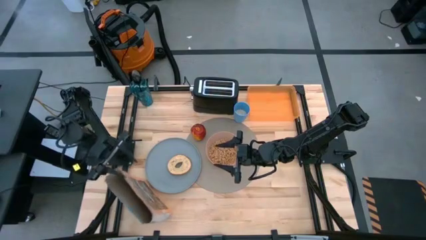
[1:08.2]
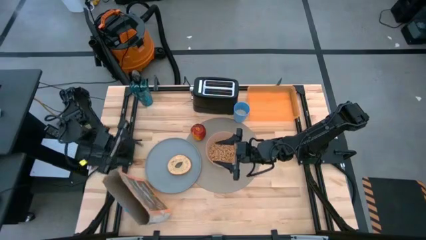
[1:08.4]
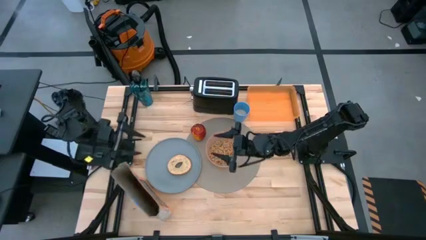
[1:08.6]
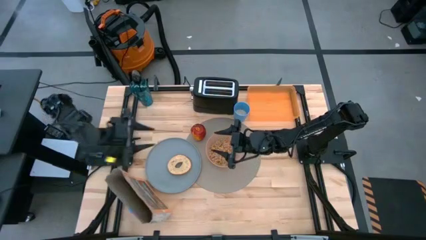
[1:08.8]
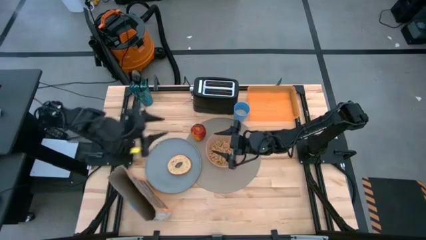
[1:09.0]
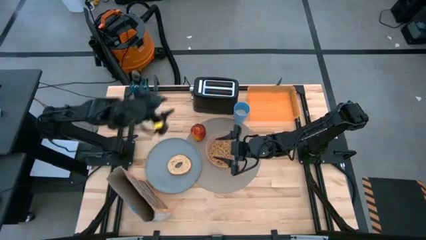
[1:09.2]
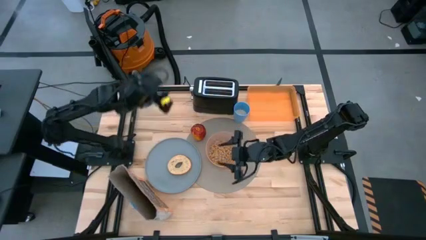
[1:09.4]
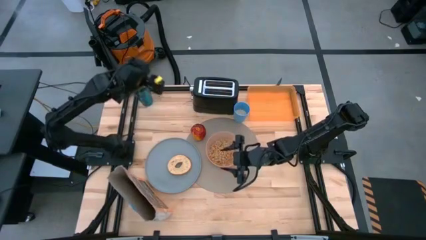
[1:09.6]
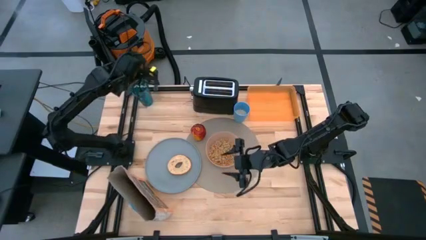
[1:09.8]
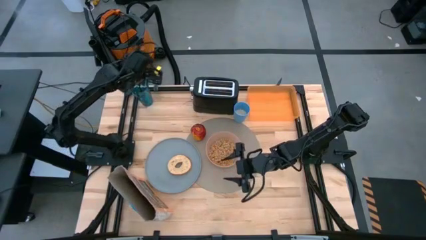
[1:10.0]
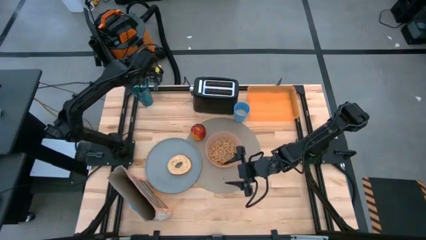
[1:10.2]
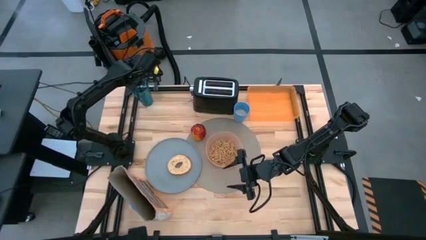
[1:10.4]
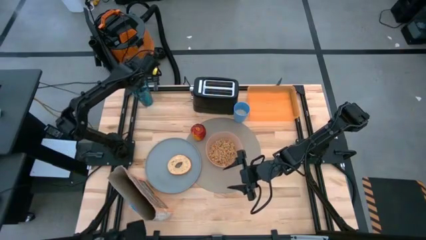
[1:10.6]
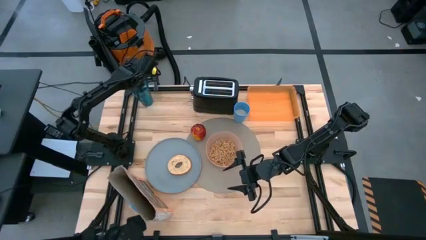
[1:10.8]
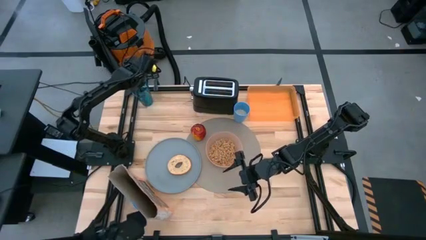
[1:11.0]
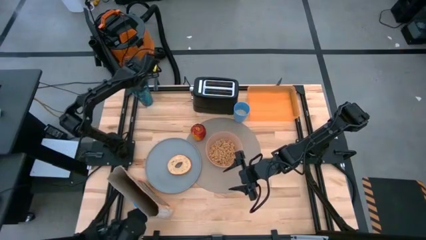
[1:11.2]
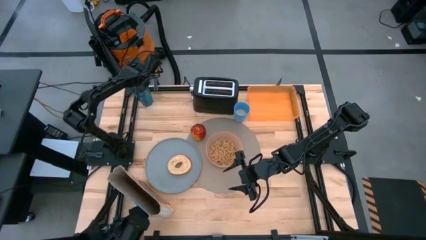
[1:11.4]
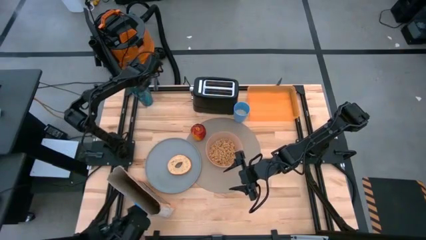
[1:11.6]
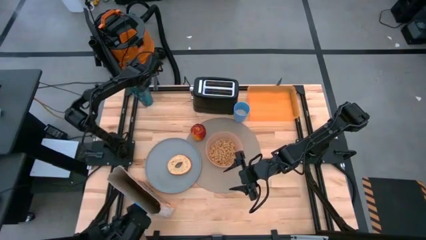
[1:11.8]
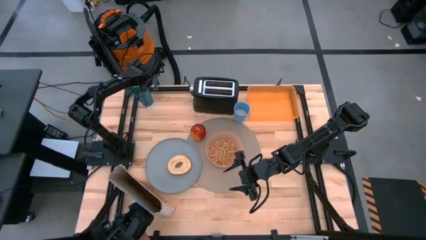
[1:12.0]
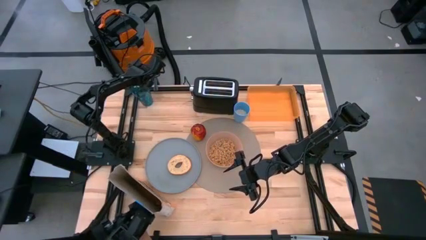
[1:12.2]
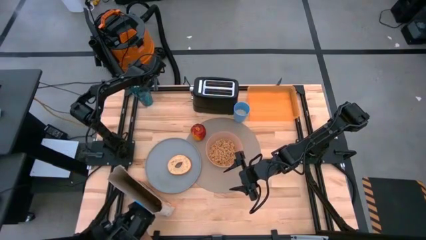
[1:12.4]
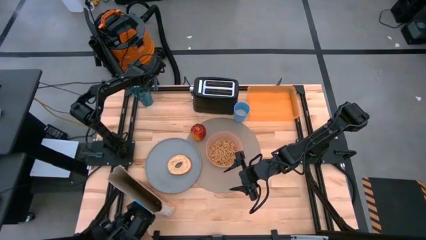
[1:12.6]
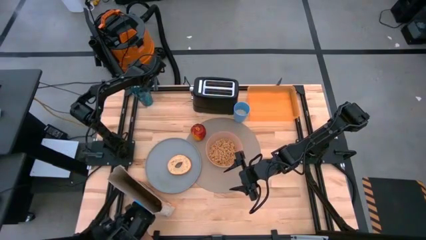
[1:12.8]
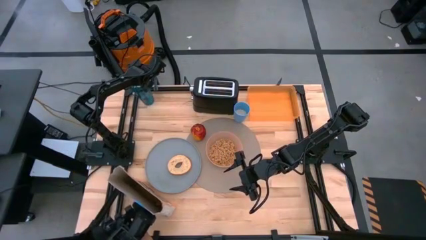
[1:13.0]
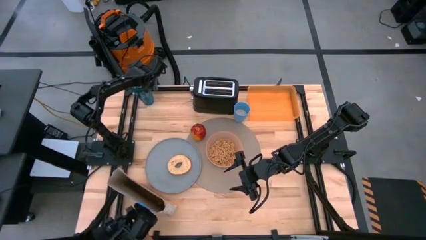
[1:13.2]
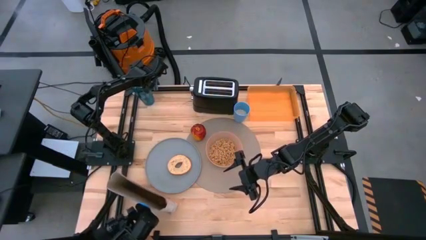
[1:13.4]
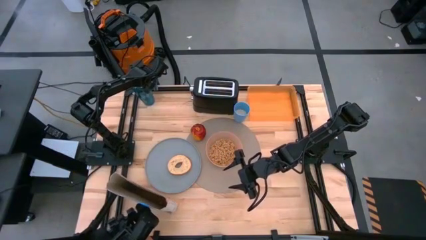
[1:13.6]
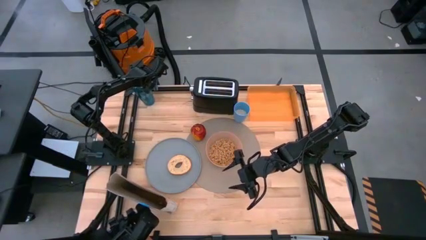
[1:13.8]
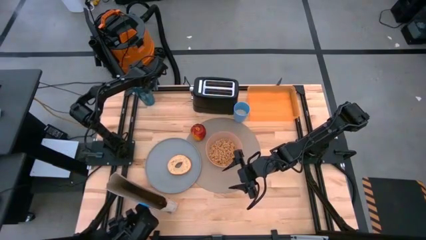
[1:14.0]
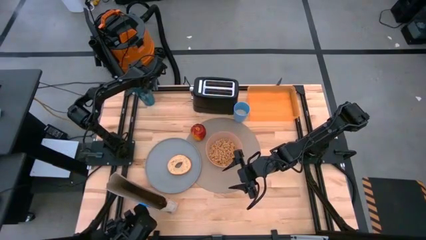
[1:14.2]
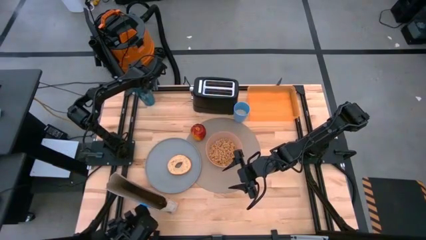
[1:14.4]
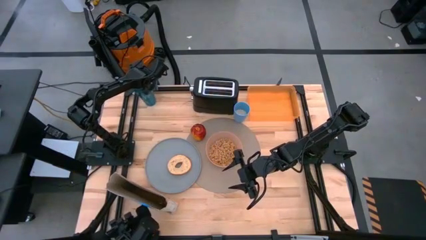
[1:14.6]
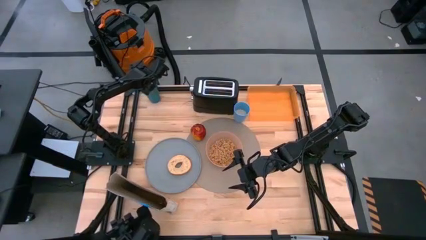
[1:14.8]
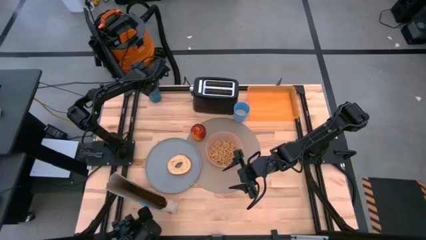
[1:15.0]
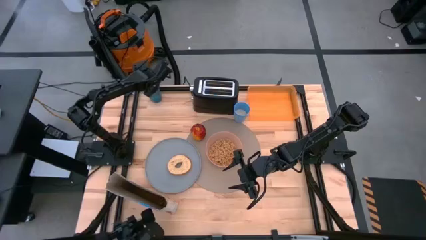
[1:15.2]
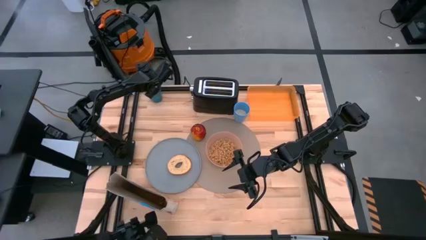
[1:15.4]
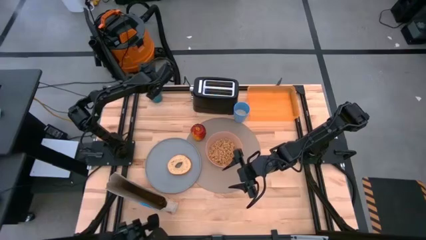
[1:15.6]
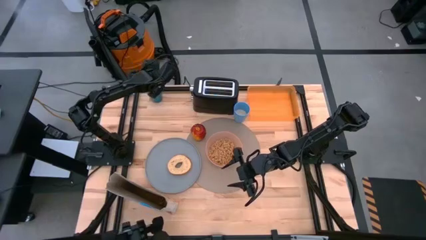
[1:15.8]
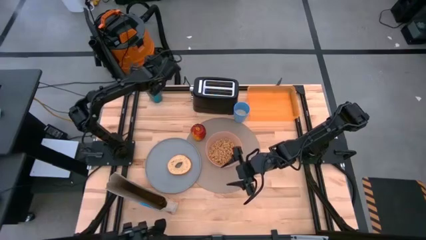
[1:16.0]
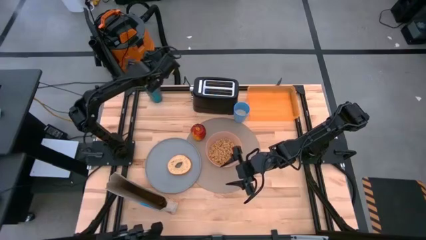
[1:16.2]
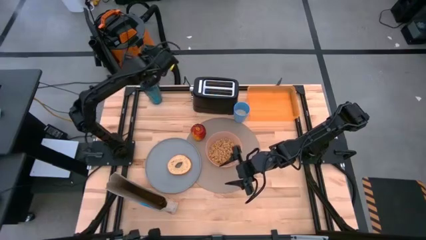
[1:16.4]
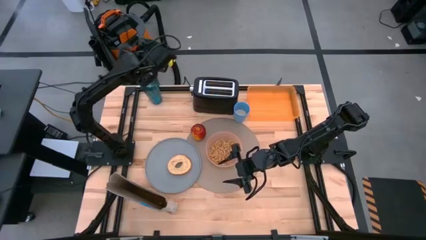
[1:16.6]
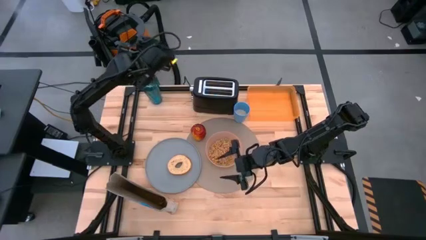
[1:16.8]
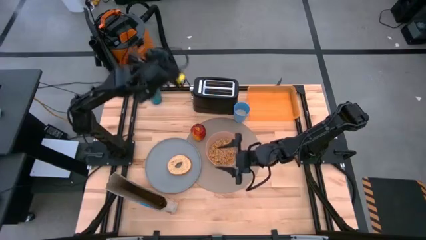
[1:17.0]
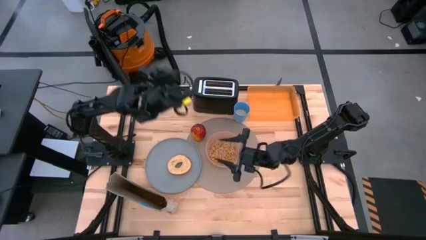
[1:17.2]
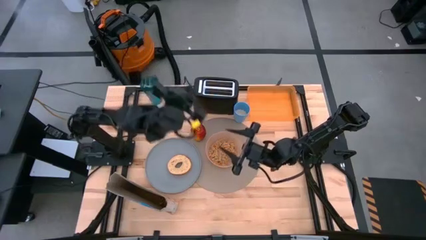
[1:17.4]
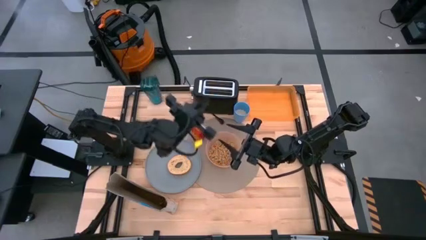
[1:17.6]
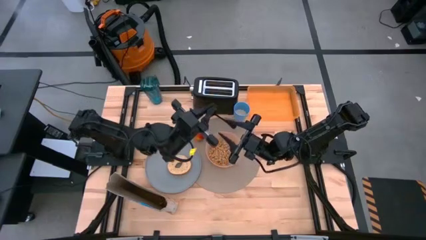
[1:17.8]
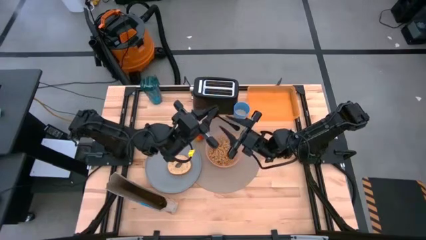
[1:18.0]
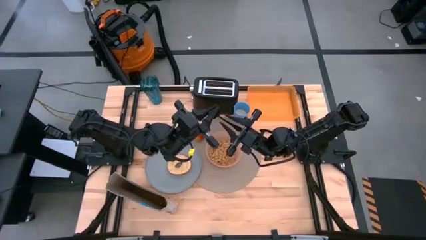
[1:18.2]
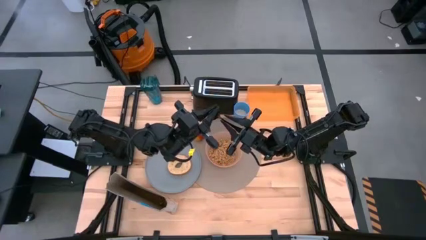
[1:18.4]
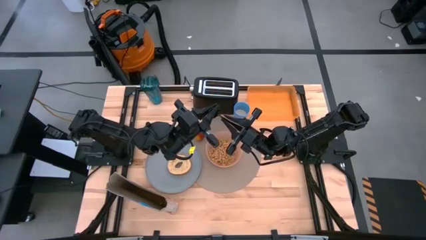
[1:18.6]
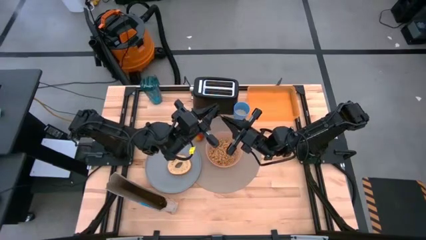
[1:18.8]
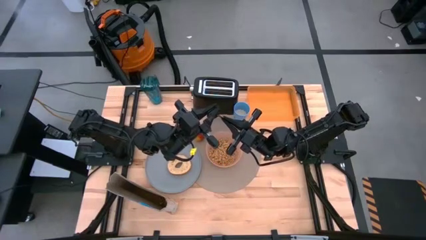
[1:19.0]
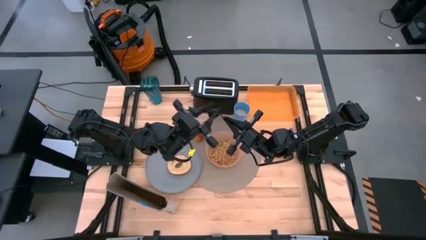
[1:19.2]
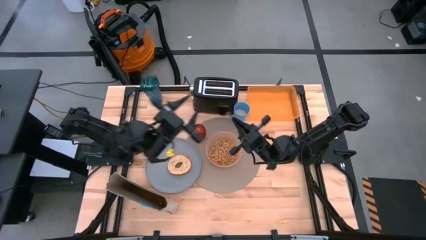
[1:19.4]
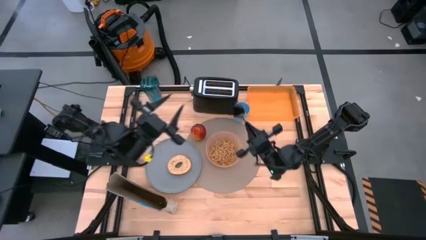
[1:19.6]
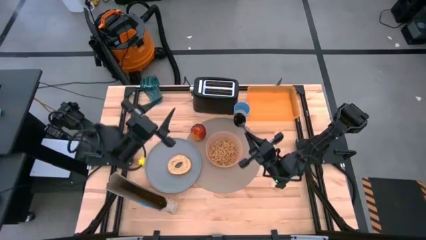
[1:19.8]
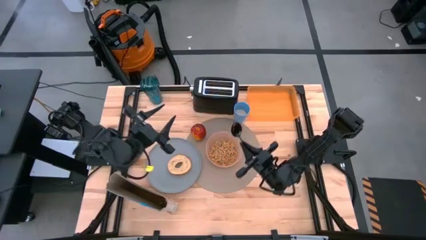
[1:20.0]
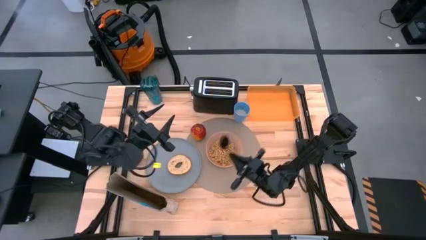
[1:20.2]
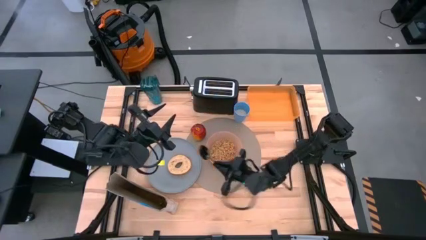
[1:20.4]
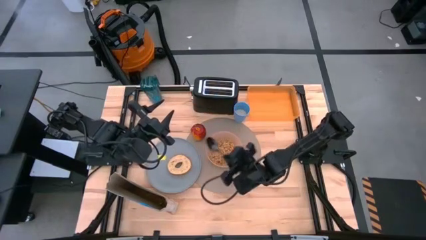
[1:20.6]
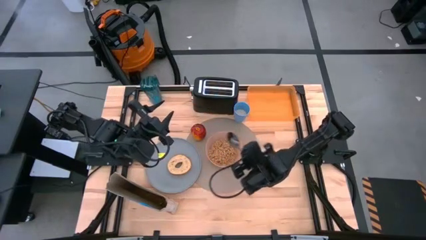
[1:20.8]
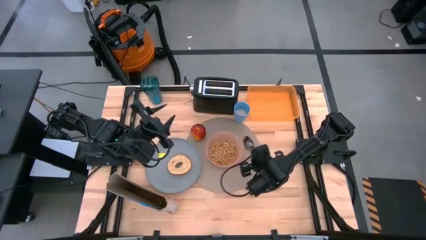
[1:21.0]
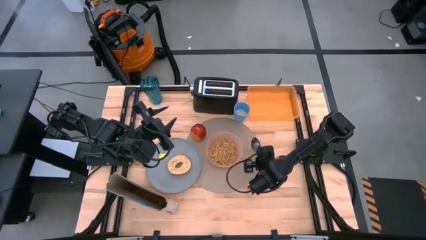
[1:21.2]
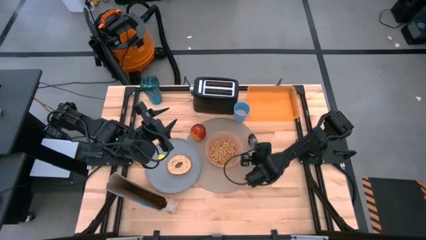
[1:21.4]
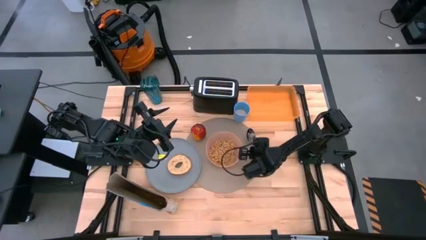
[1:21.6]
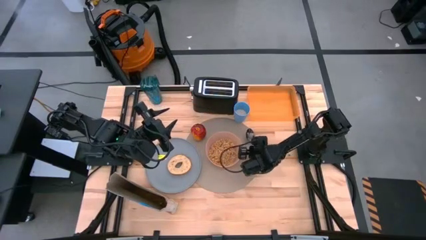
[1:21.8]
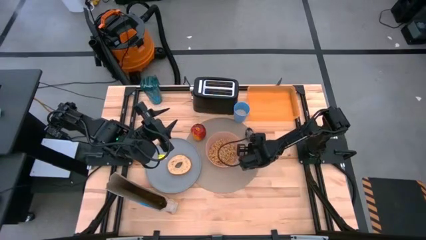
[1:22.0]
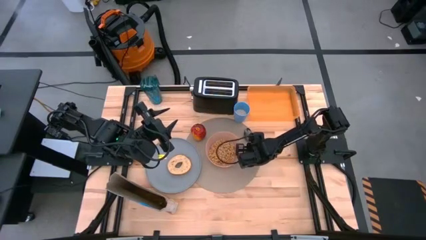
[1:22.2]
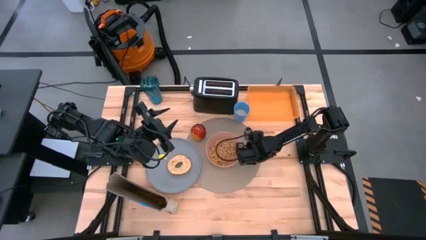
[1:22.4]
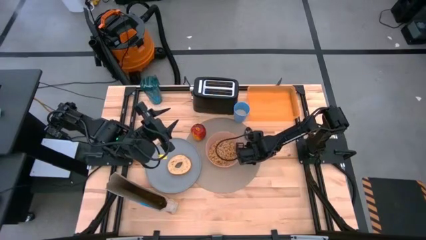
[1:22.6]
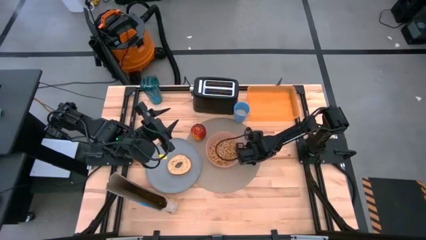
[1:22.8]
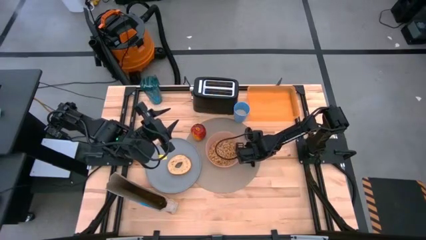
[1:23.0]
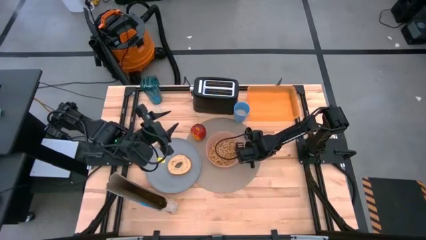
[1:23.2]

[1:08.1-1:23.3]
Task: Arrange a breakfast setting
Put the black spoon on the gray placemat beside the orange bowl
